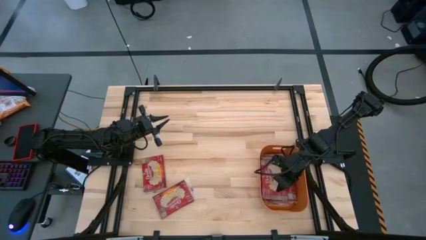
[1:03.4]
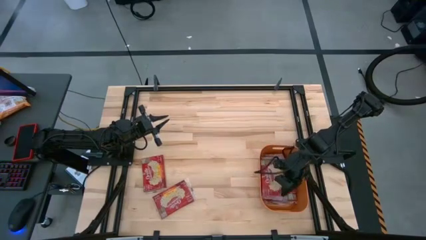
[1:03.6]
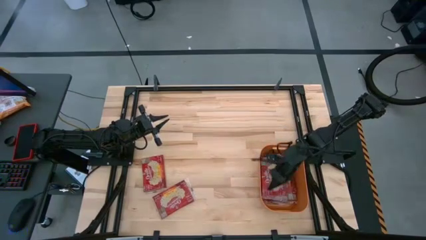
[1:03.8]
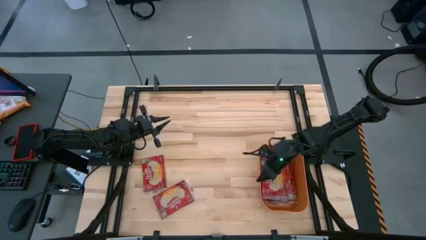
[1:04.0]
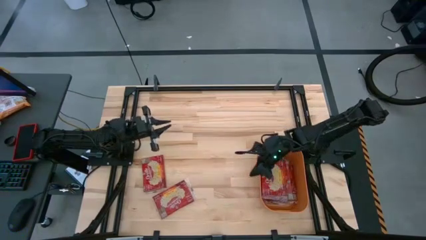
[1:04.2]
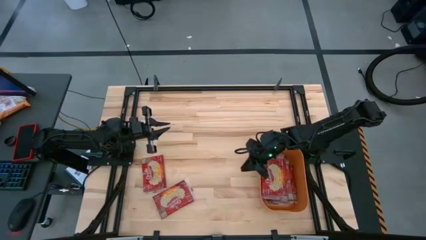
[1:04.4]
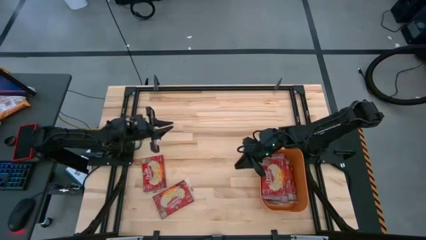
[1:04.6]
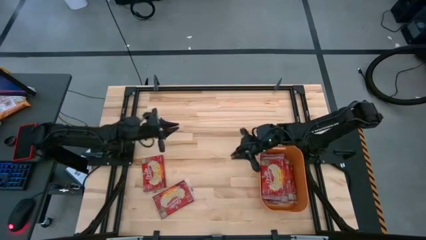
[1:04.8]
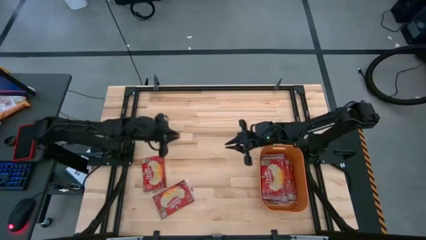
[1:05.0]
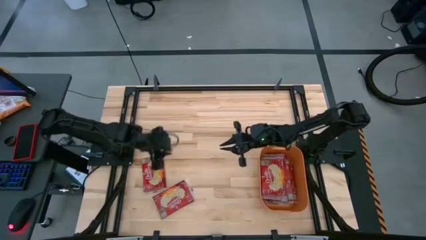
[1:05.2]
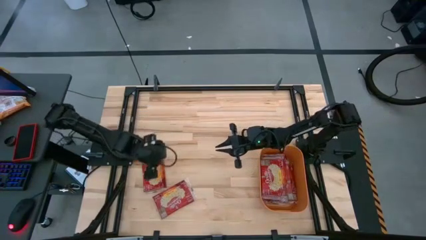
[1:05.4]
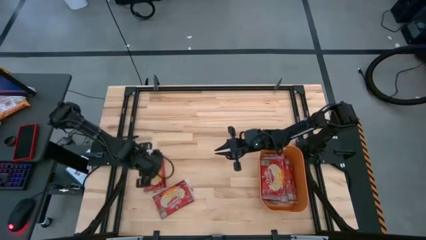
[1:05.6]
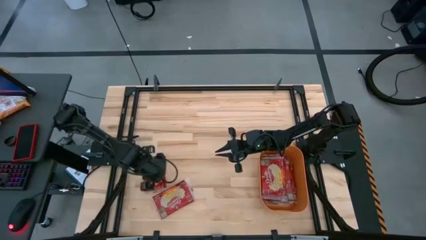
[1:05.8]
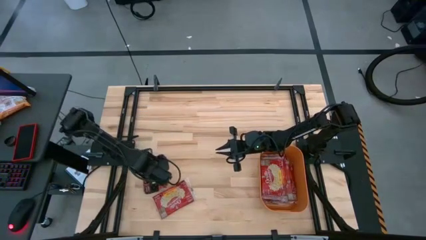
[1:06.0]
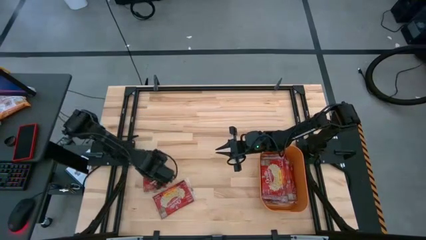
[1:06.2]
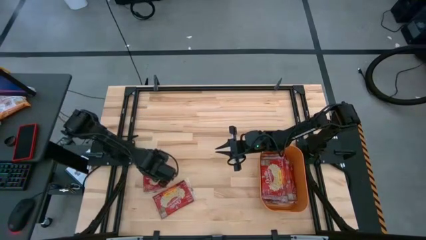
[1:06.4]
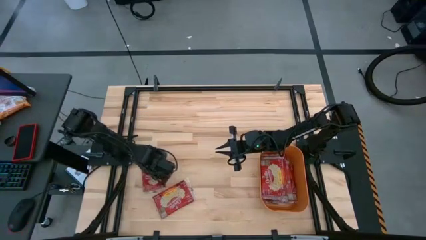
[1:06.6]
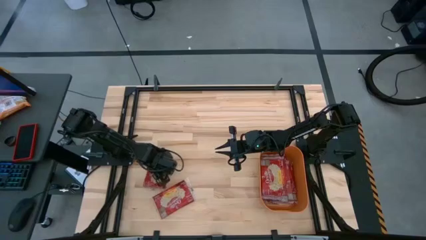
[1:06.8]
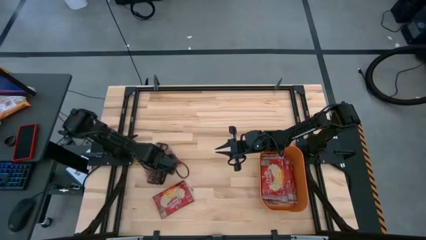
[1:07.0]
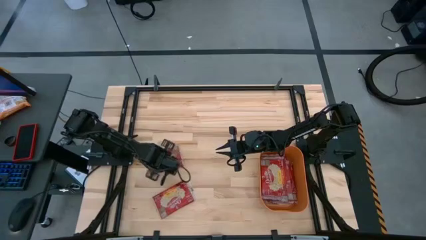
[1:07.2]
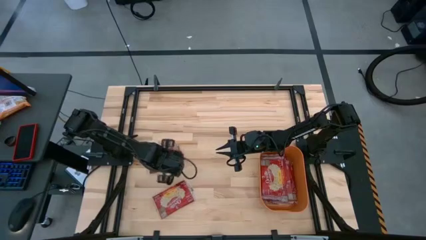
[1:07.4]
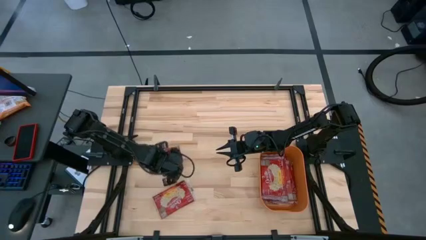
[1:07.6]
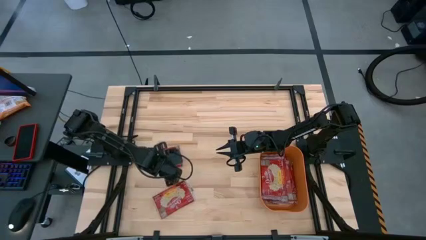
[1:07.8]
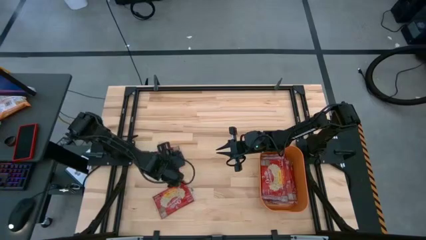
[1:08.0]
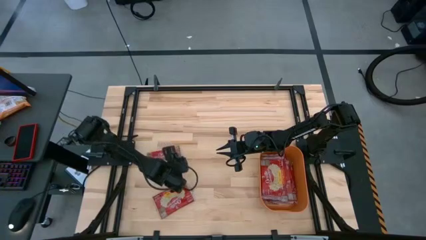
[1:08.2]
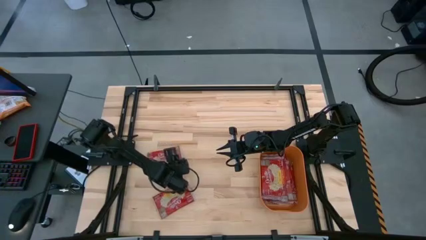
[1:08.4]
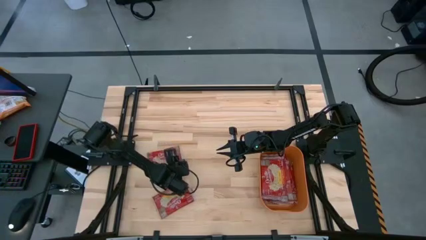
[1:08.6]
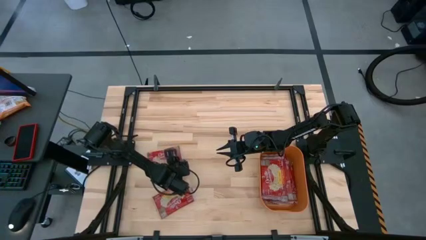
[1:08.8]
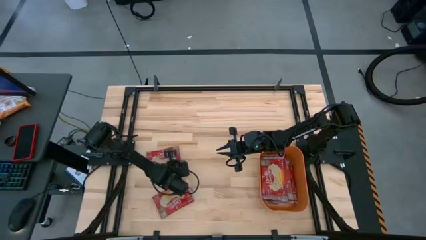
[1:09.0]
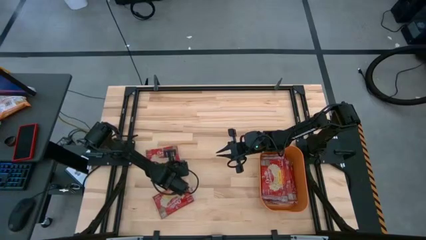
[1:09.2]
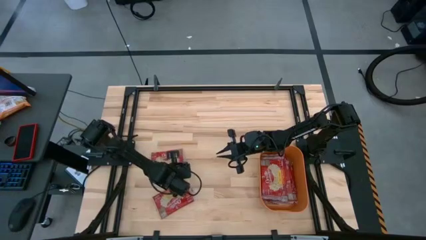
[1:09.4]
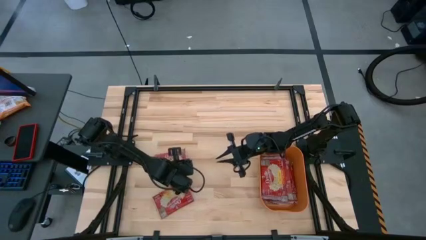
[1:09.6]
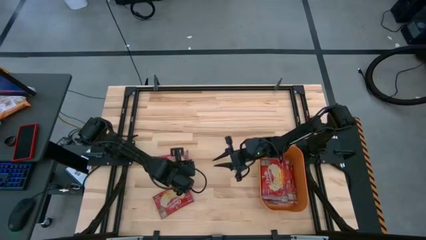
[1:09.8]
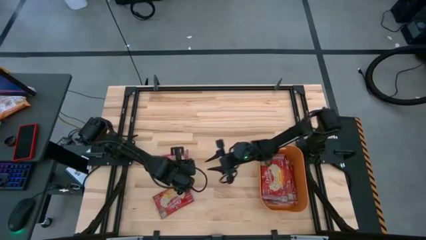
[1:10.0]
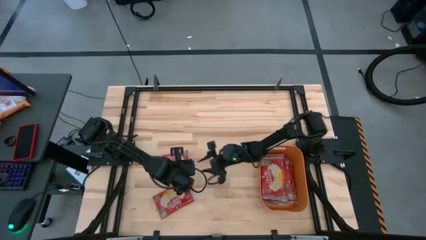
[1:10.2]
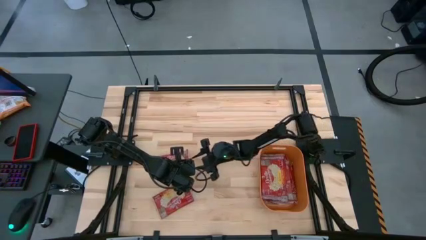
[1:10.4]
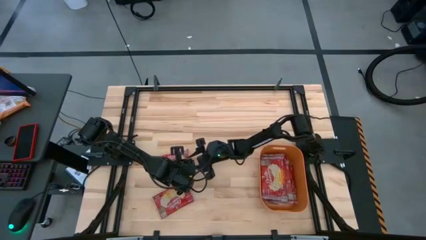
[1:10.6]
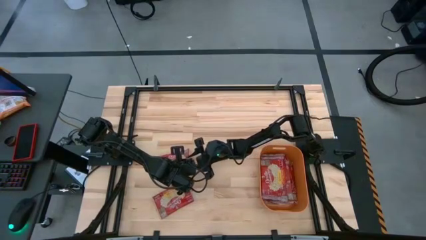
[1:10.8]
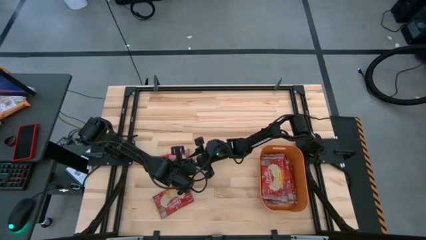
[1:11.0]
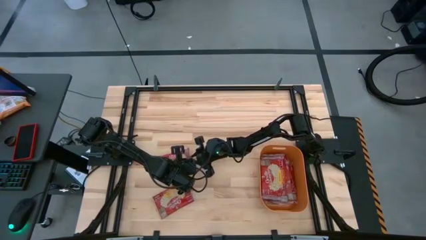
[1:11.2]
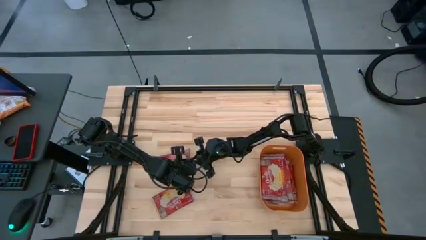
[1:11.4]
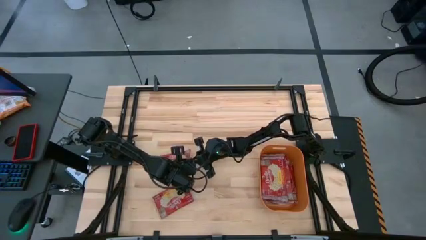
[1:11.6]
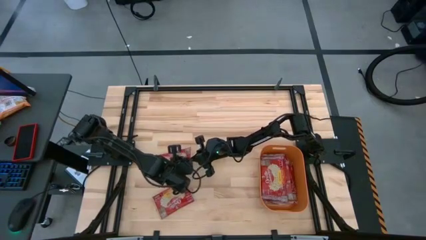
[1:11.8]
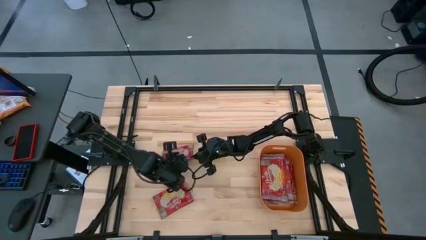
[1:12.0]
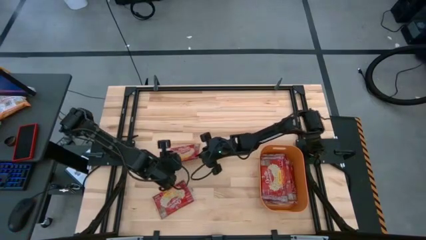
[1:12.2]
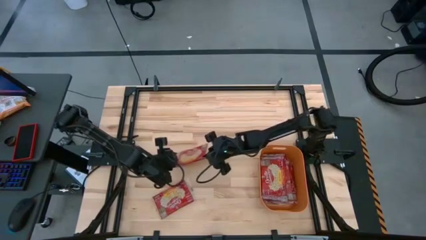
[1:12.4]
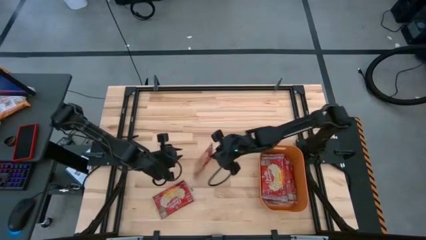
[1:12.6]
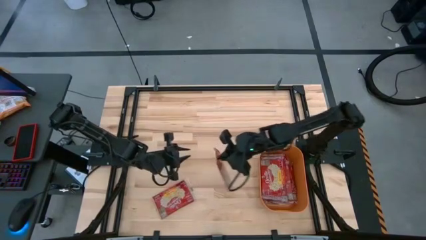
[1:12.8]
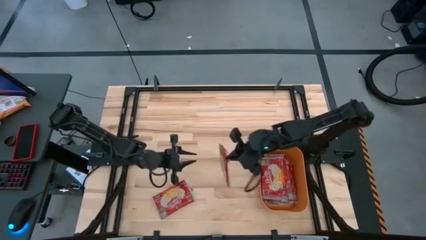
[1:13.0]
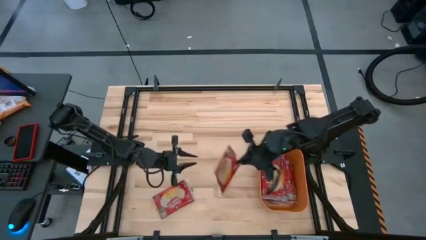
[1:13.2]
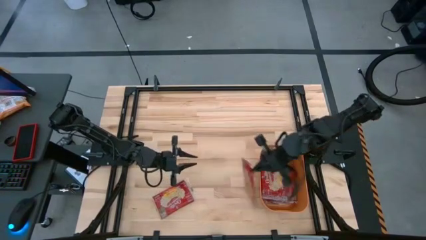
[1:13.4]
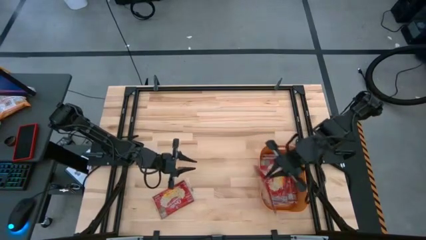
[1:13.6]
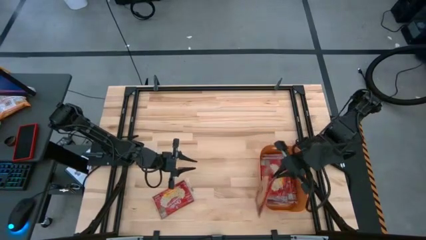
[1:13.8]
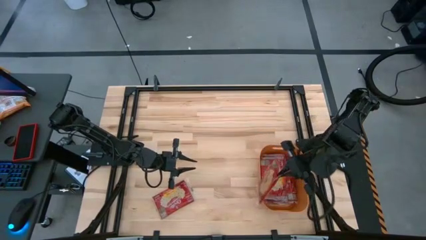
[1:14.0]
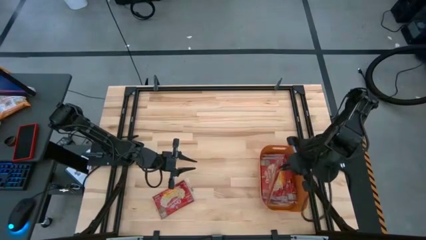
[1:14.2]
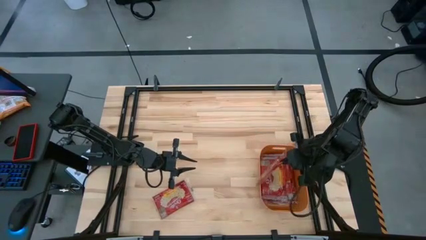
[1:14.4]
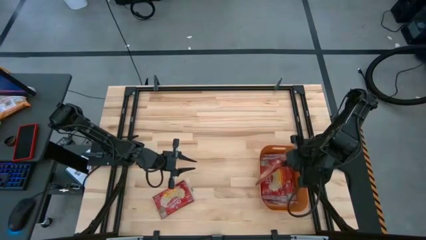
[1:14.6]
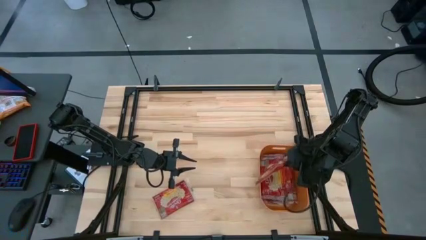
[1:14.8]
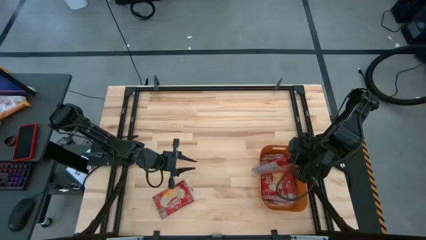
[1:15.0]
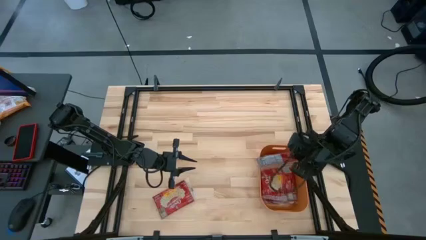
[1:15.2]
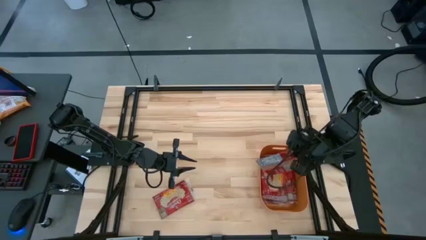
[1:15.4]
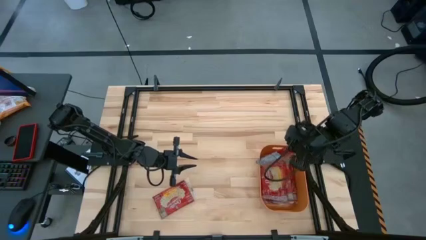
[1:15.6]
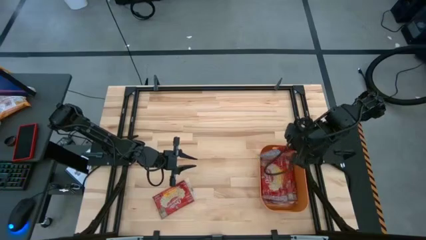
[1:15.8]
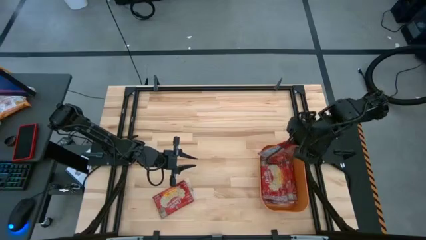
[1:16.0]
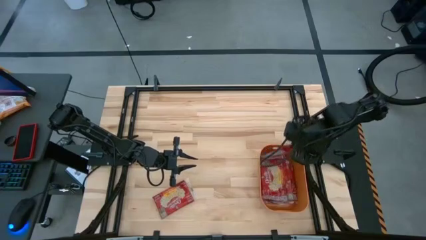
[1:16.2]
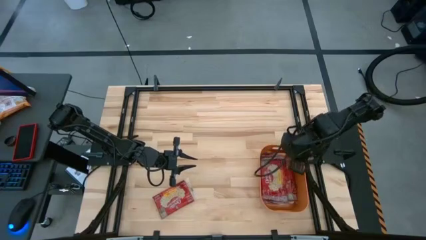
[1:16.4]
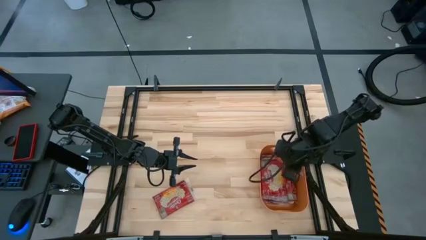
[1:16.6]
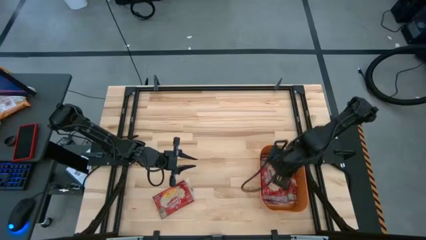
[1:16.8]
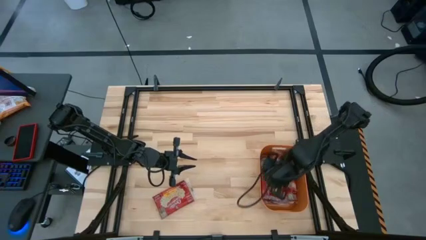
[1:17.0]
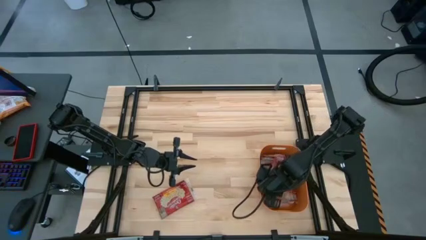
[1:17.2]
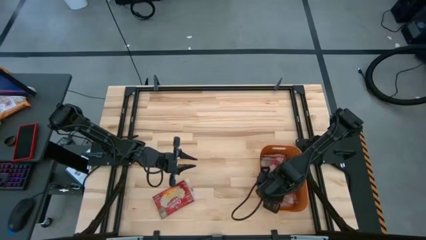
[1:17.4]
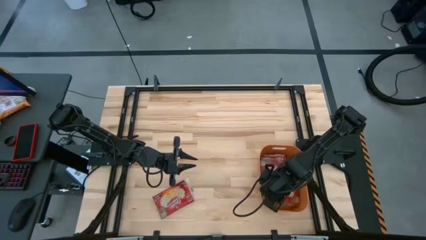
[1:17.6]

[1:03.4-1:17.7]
Task: Sort popcorn bags into baskets
Put the red popcorn bag into the orange bin
